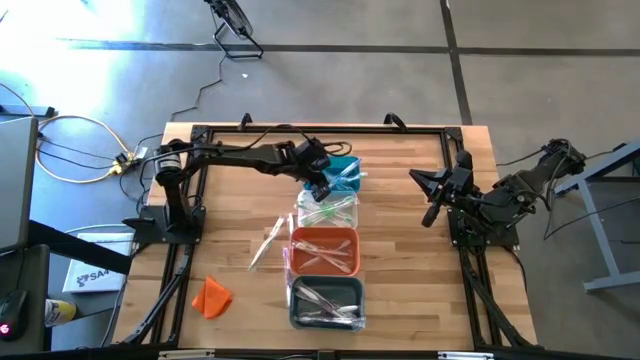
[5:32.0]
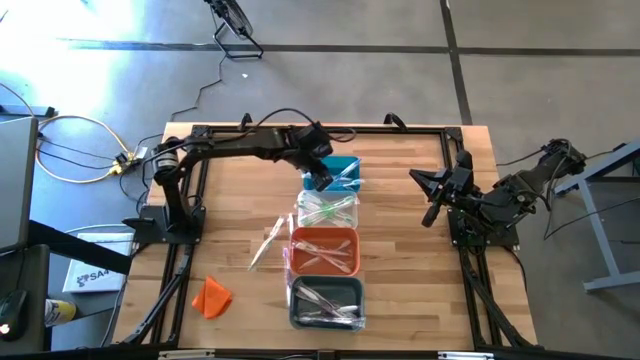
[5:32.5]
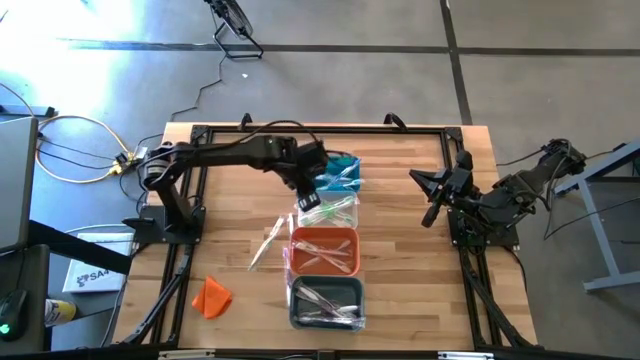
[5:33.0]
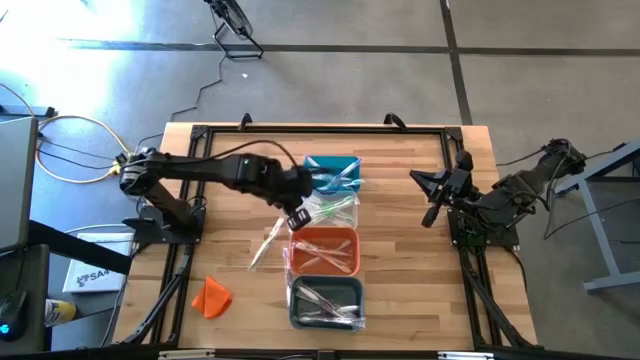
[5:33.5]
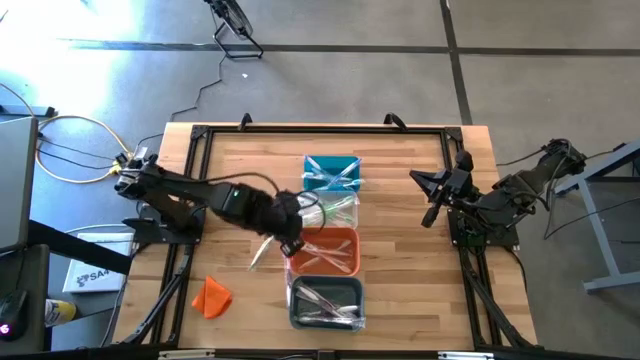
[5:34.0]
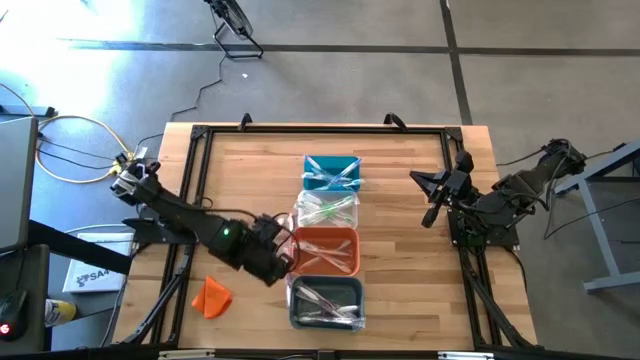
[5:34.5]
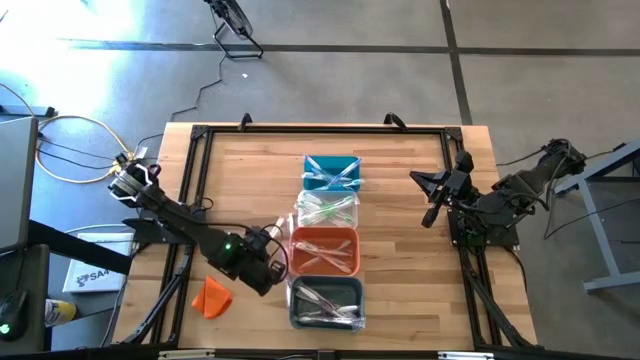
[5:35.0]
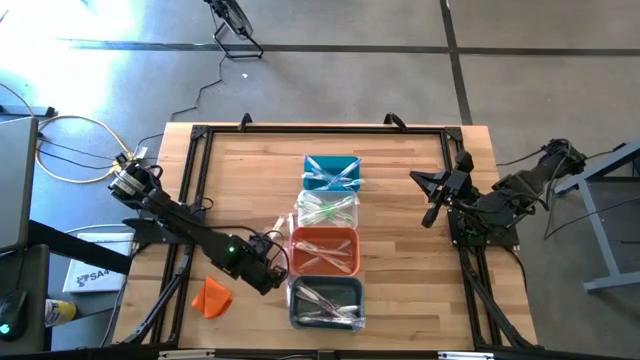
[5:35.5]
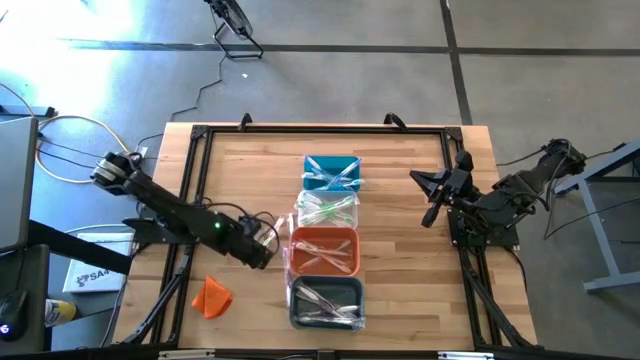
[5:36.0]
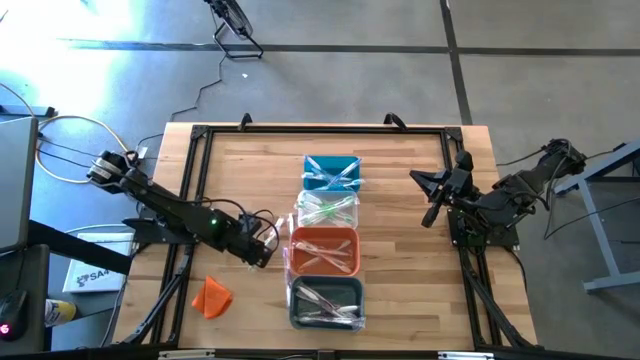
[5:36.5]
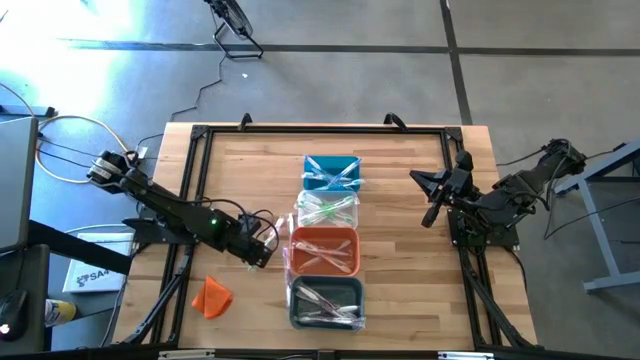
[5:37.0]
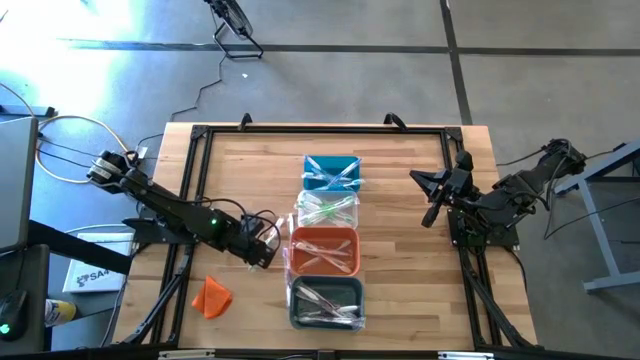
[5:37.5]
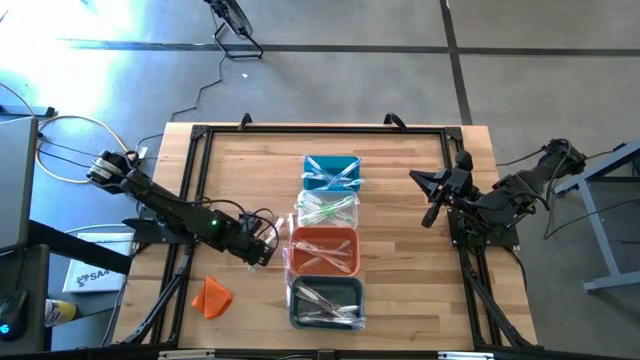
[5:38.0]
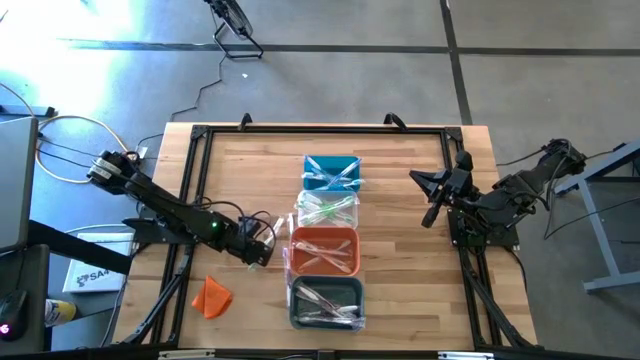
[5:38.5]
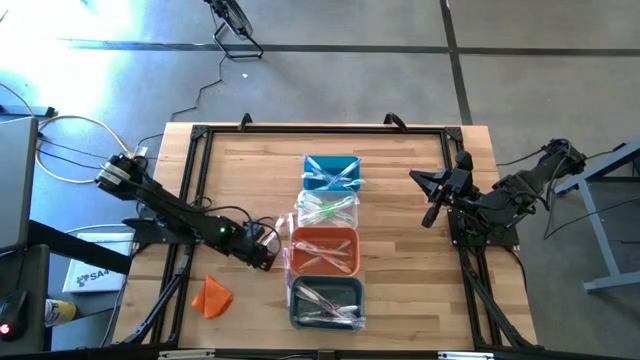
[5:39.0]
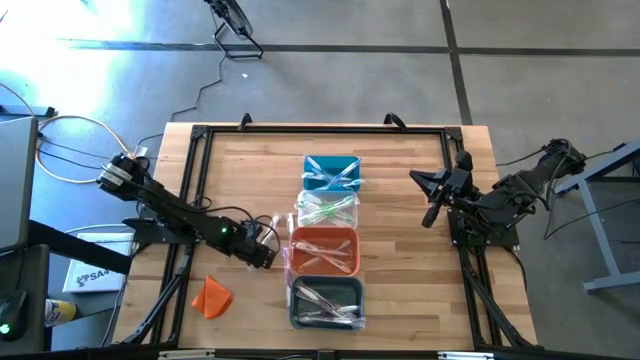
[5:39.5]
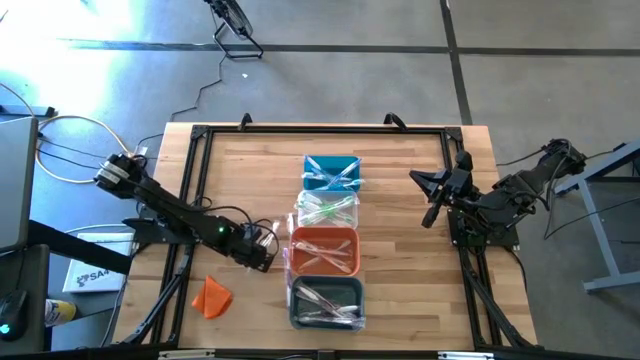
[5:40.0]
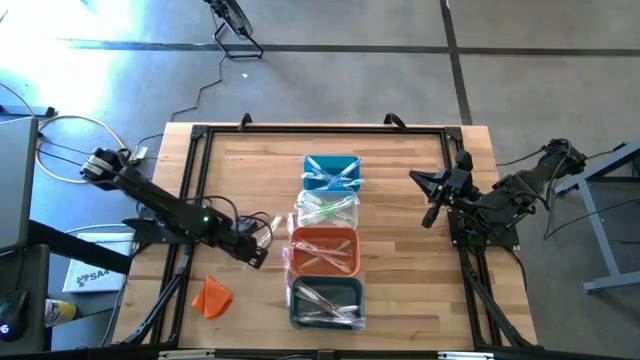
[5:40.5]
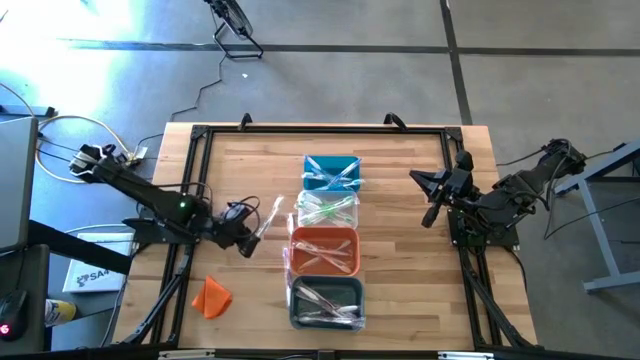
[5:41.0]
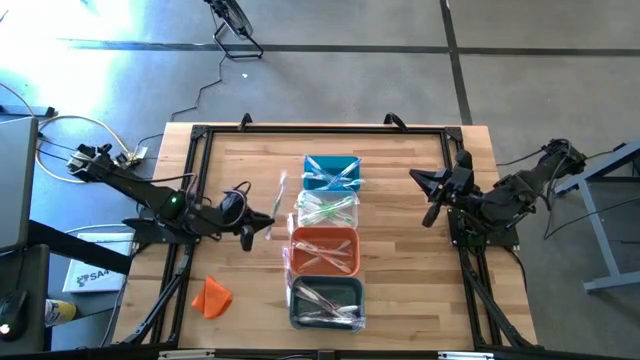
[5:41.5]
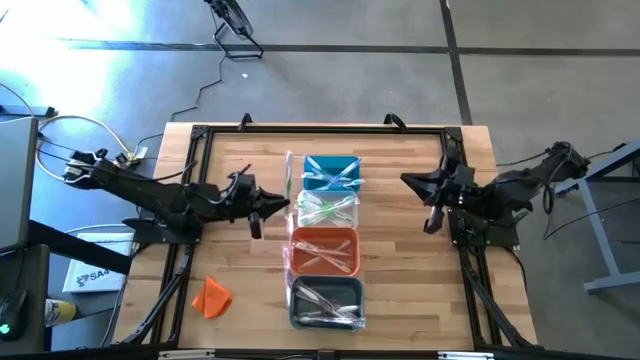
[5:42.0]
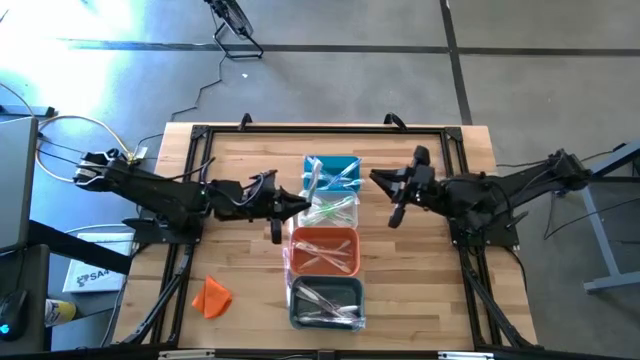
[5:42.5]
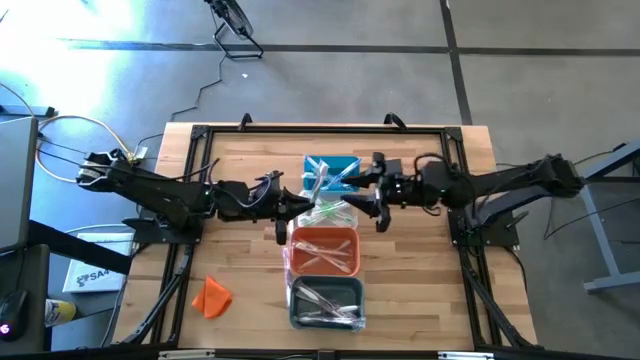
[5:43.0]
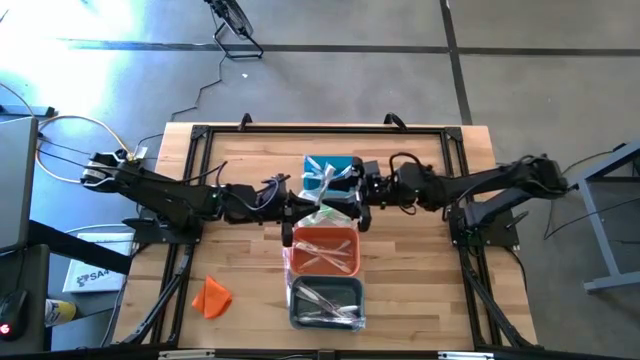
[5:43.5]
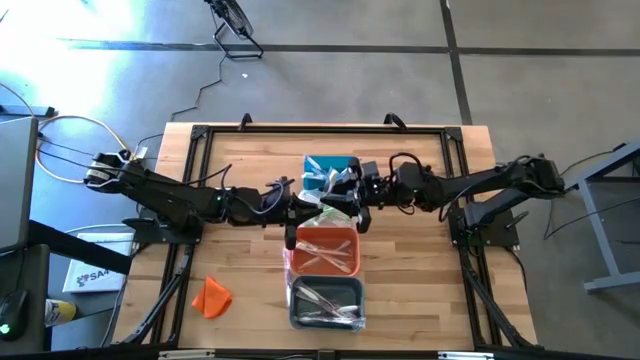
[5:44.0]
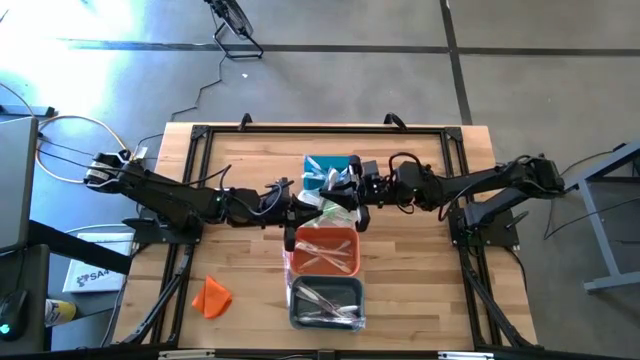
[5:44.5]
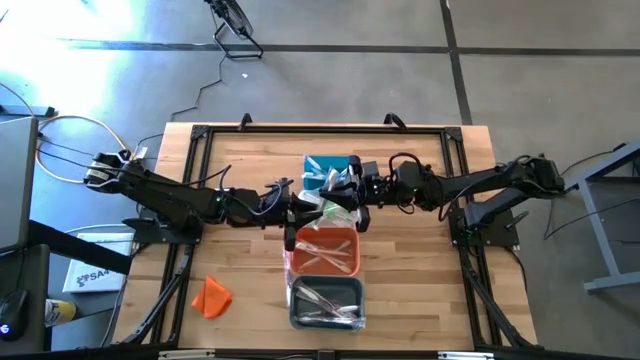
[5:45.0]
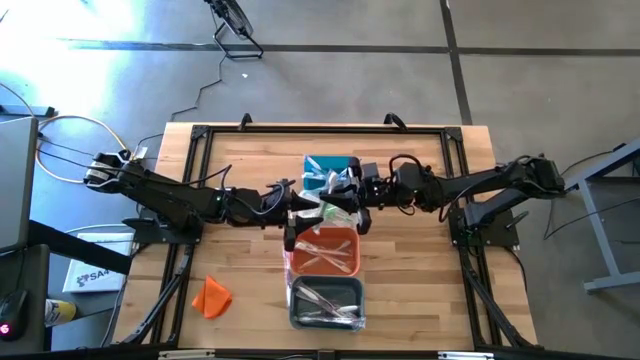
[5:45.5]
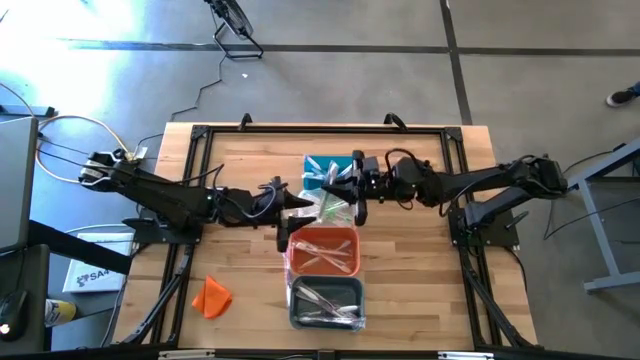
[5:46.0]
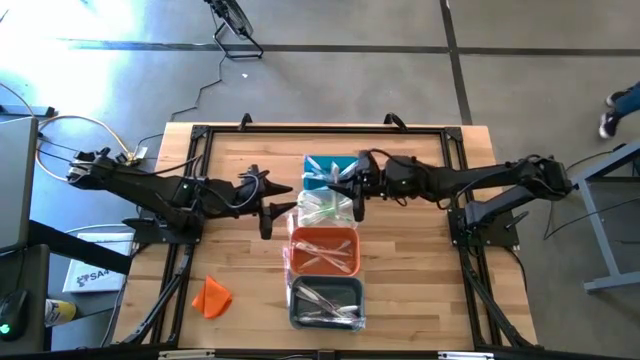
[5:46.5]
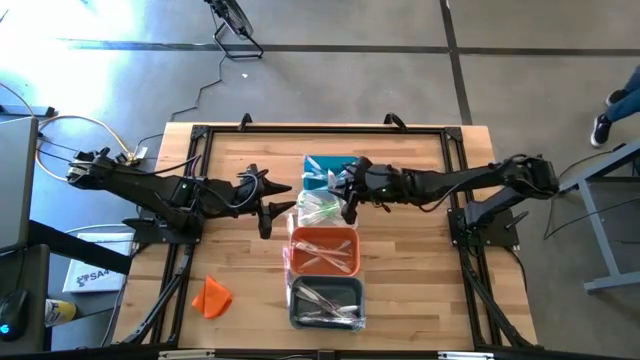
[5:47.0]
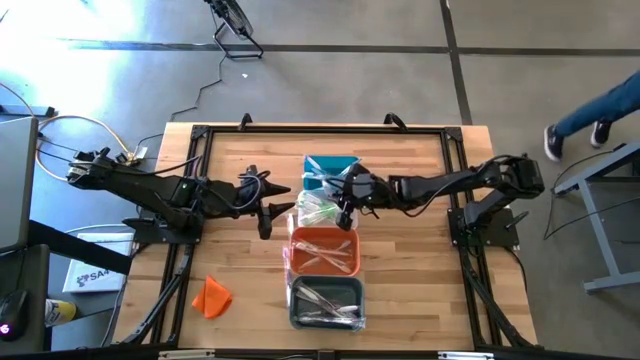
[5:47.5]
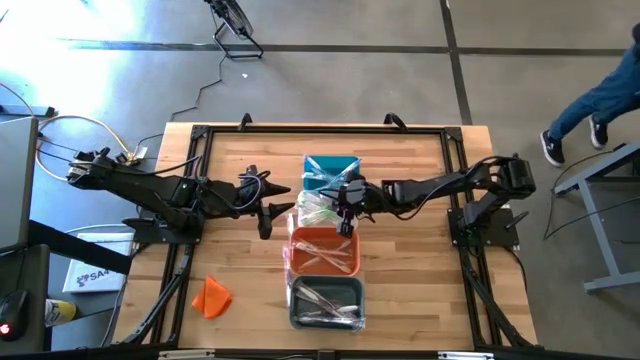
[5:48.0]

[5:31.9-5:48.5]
Task: Pick & Place Toothbrushes
Put the green toothbrush into the transparent bin

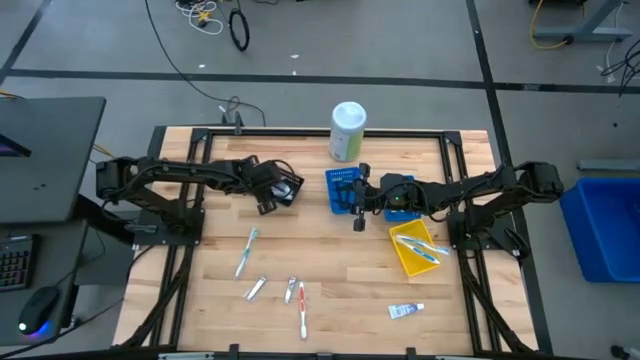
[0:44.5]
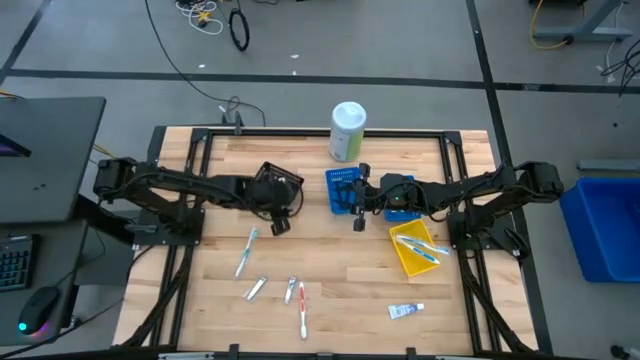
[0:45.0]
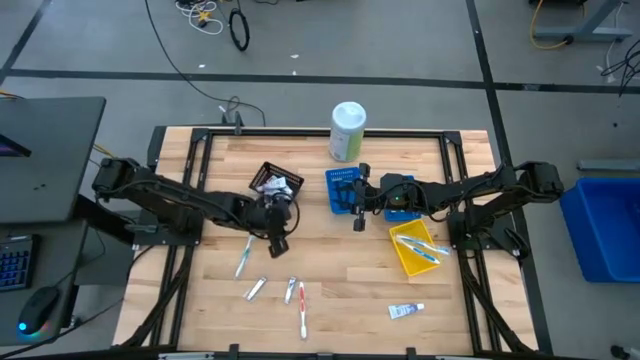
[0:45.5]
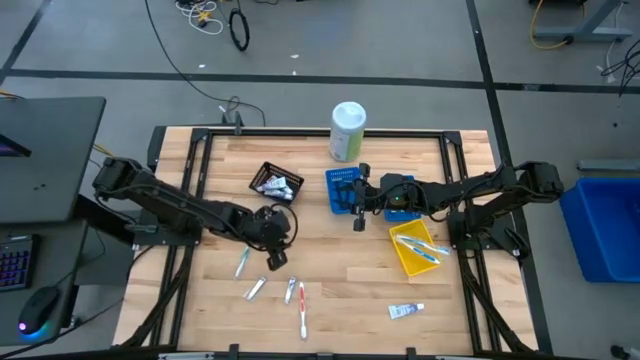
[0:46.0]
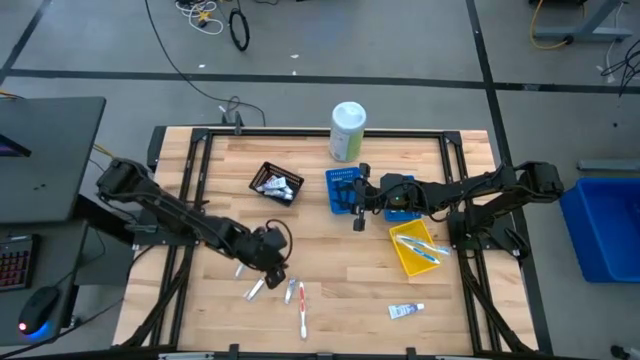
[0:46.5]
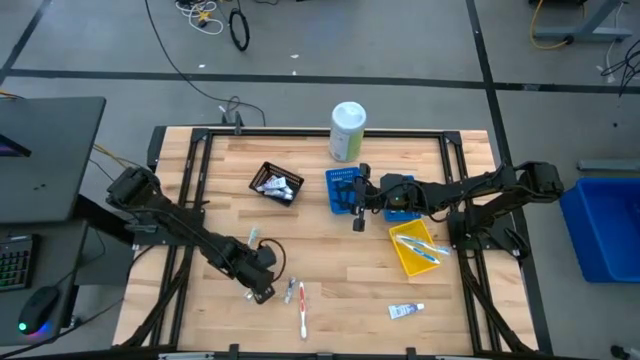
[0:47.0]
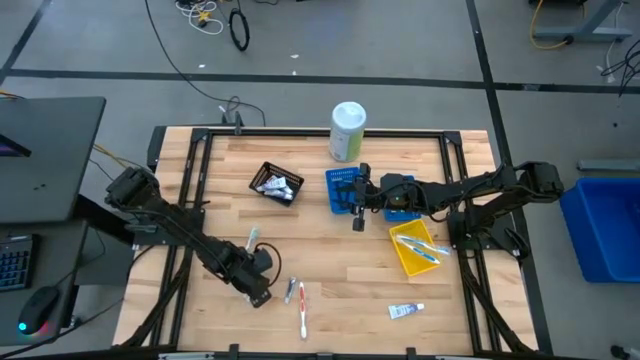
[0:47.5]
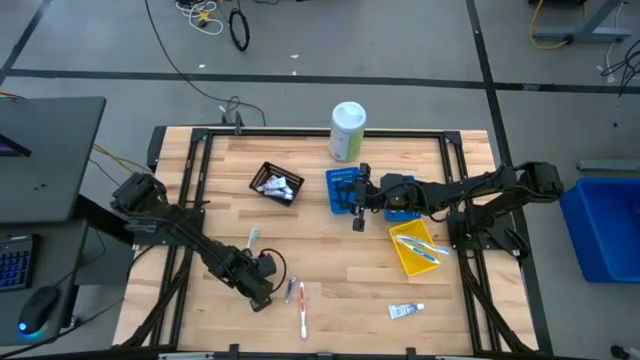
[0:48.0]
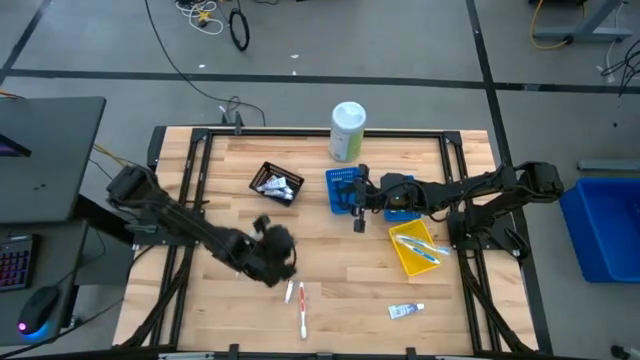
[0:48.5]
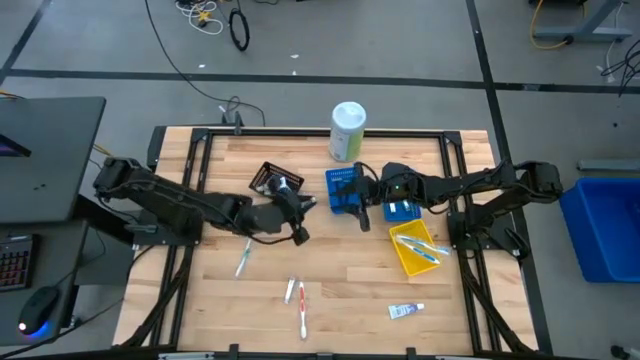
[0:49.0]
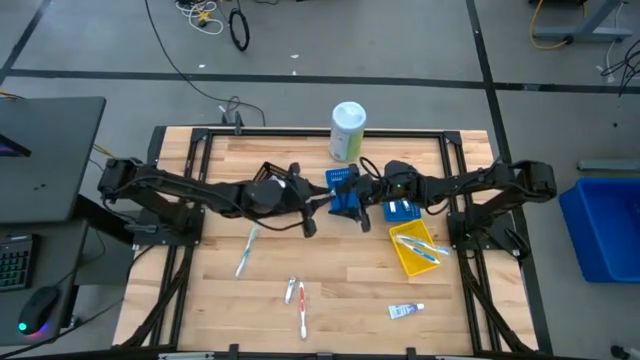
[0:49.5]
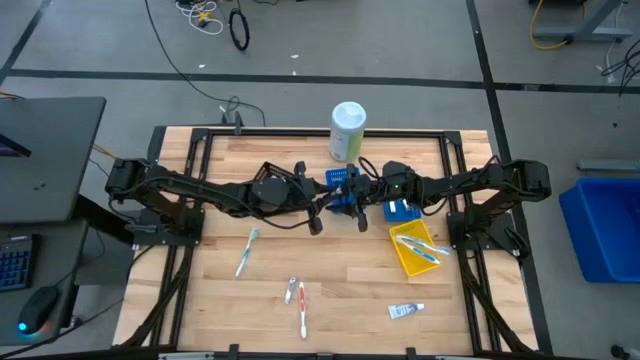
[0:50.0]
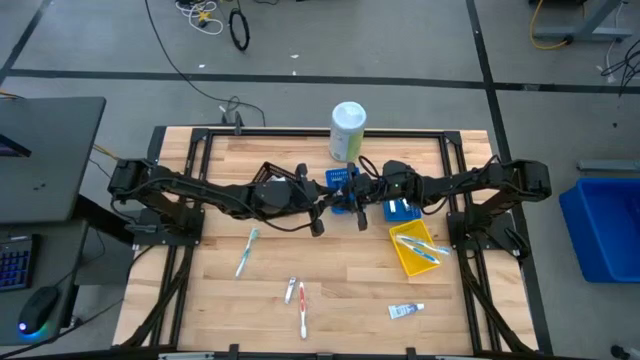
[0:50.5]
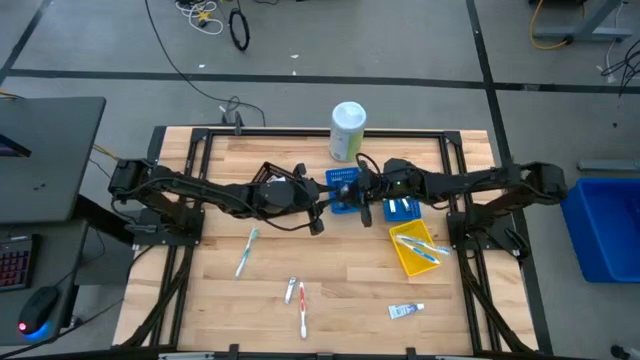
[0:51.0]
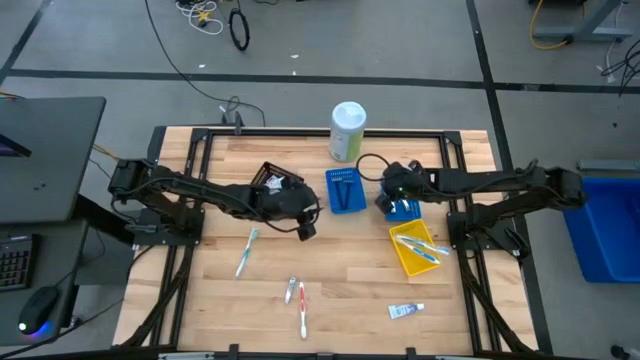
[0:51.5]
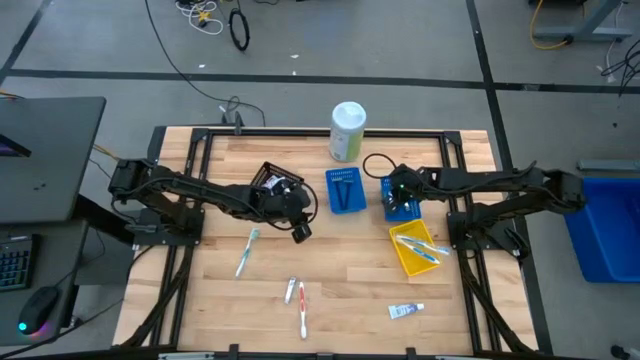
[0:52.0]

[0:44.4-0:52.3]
Task: Pick & Place Travel size toiletries
Put the nail cutter into the right blue basket
